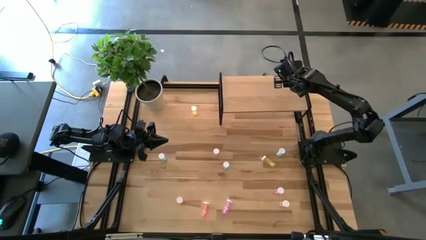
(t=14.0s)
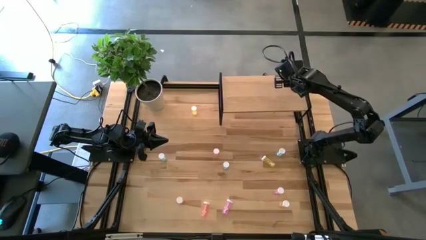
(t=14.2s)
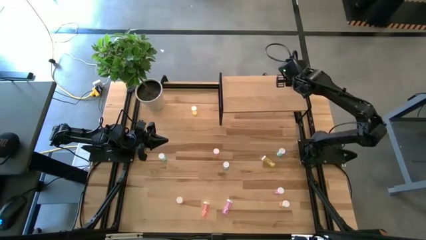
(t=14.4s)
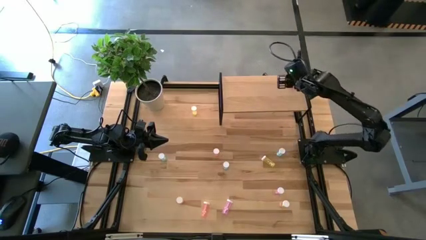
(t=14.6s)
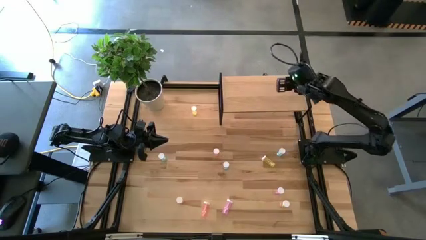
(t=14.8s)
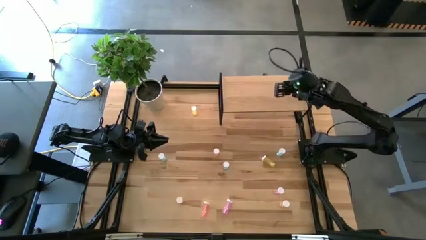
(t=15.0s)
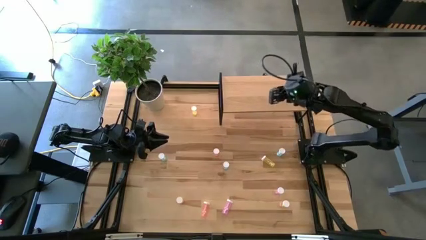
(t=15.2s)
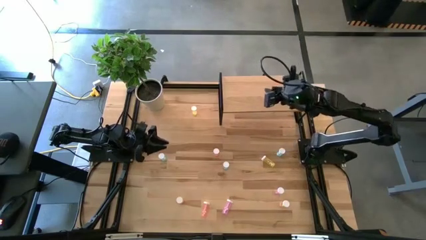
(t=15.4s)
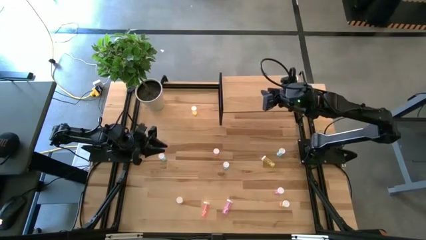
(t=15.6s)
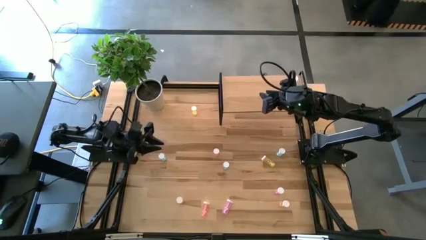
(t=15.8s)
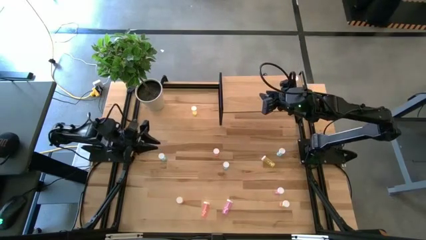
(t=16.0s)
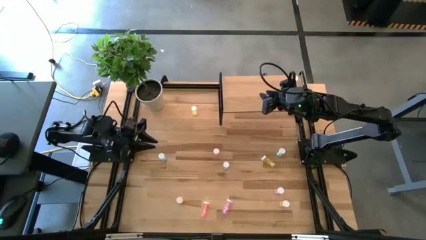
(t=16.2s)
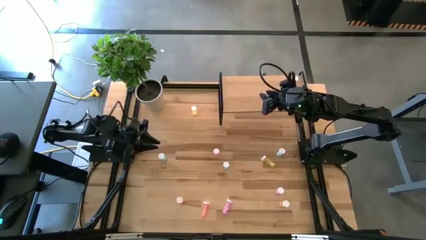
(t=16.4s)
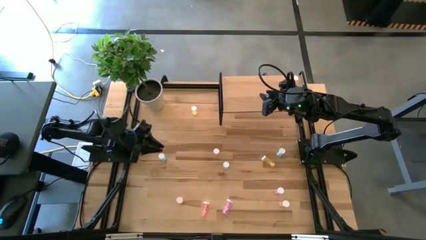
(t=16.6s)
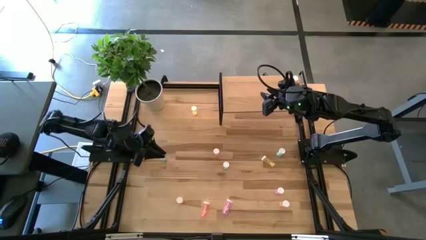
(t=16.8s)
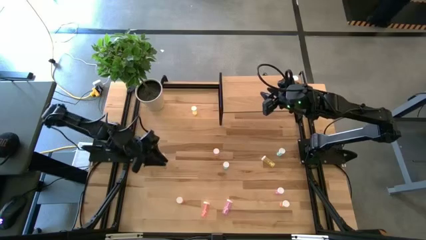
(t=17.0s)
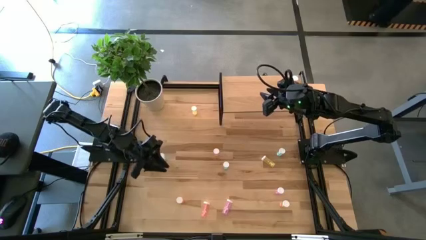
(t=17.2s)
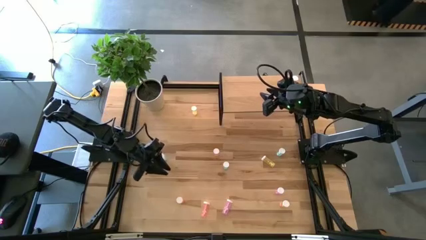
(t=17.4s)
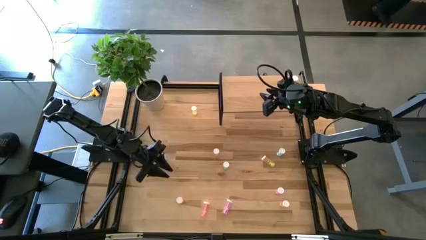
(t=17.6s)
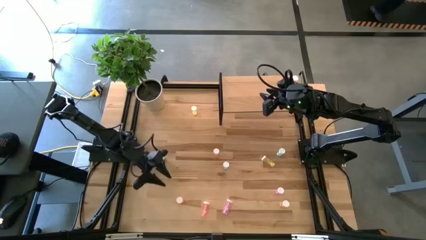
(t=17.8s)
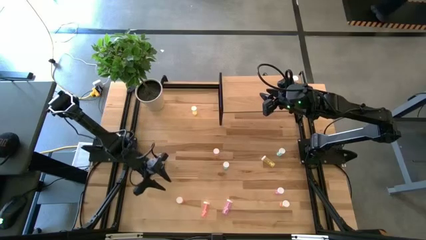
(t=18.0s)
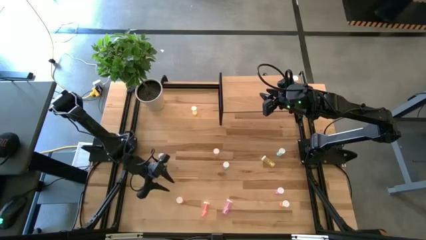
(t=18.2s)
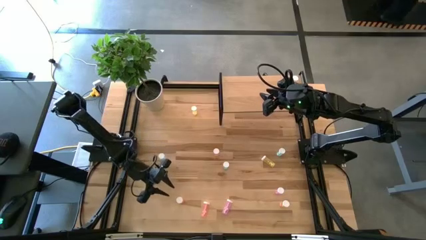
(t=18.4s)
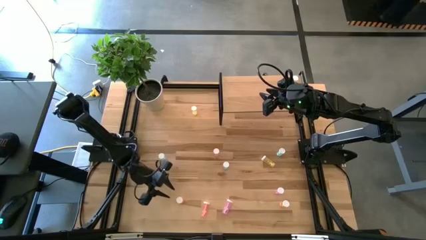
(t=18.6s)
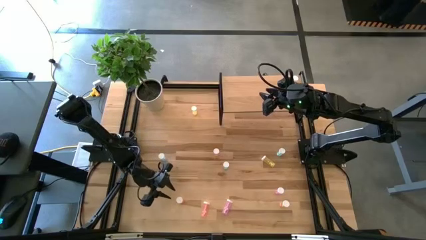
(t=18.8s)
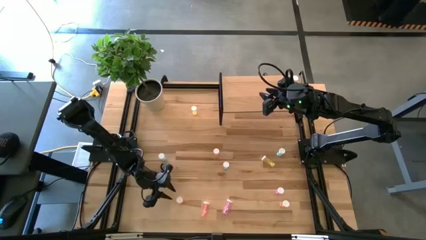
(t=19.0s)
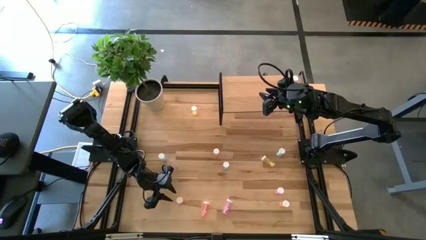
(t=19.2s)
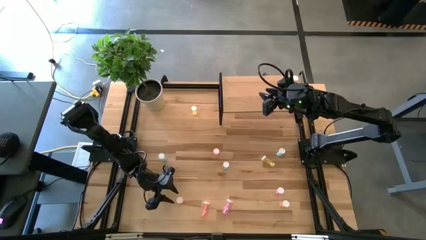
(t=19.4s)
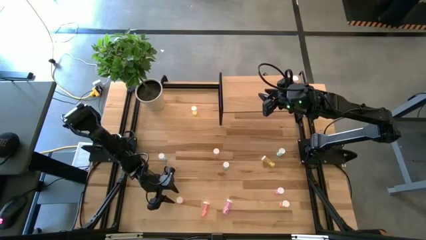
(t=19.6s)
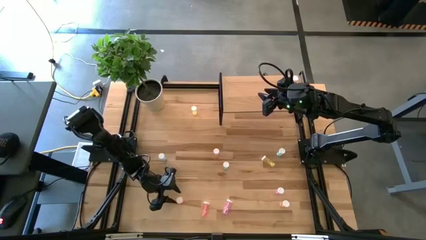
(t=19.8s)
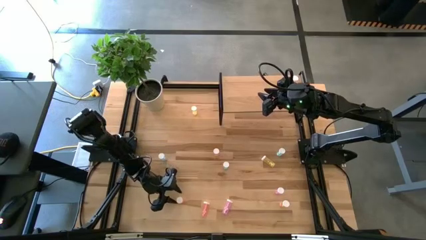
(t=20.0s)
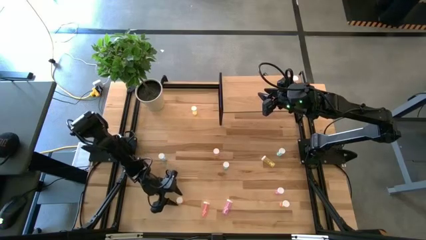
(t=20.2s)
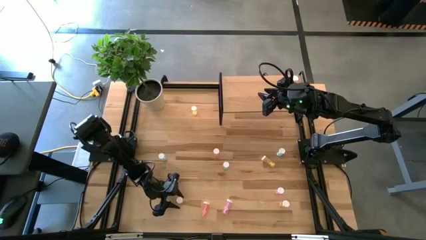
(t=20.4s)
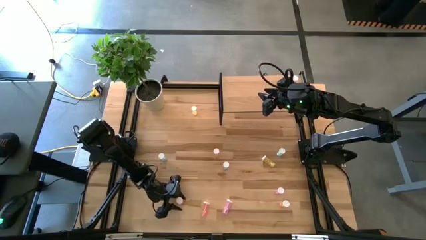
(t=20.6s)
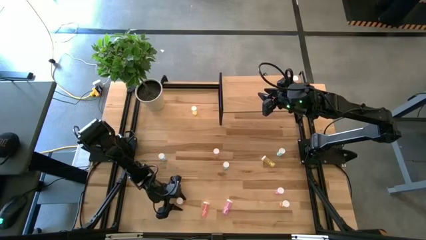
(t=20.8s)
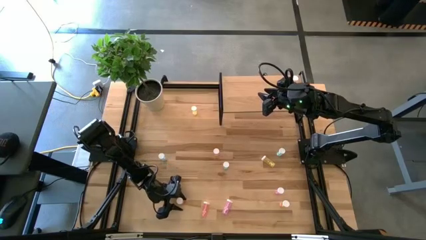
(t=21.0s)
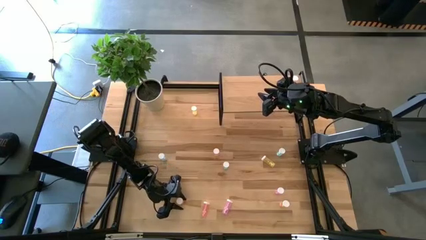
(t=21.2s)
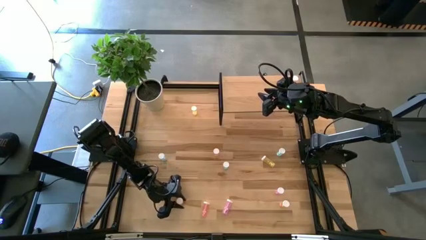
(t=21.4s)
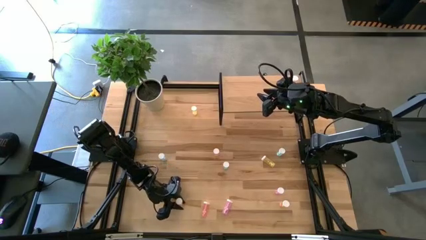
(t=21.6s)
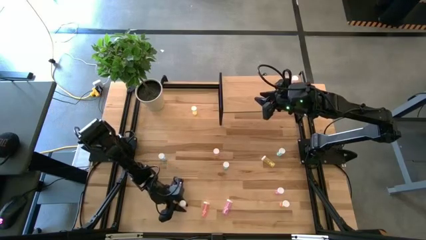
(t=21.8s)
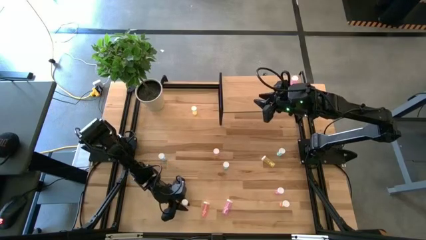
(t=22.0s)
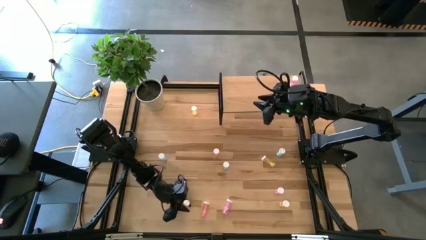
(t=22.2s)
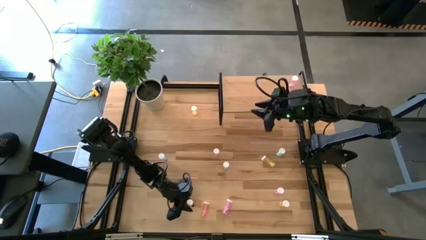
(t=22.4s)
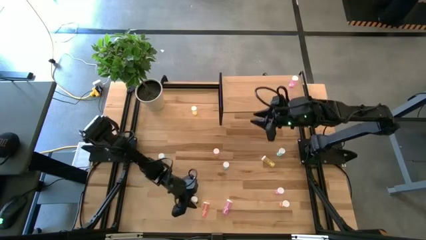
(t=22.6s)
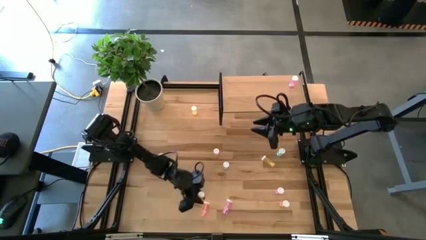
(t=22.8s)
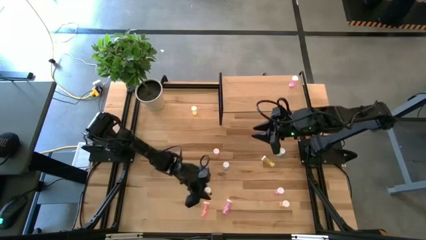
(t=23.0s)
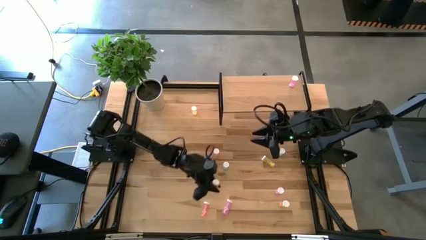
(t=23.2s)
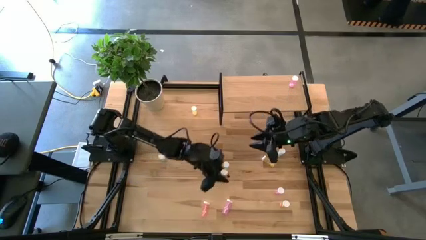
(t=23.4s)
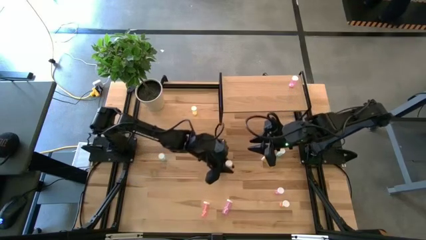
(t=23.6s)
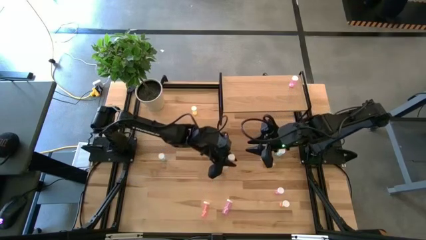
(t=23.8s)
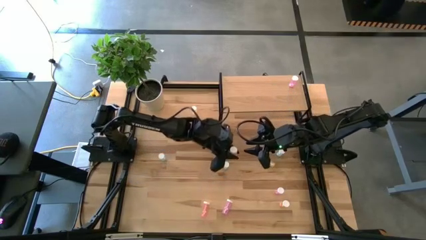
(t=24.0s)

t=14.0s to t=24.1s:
Task: Pick and place medicine bottles onto shelf by color
Put the bottom left pink pill bottle on the shelf

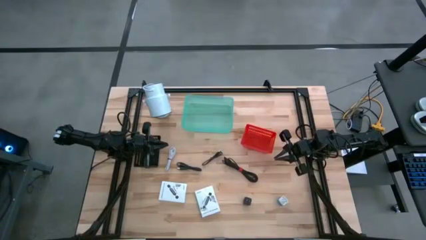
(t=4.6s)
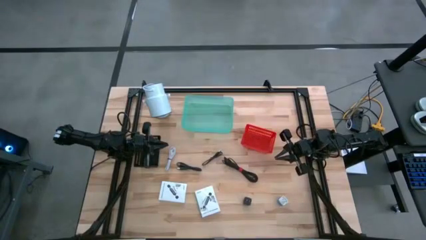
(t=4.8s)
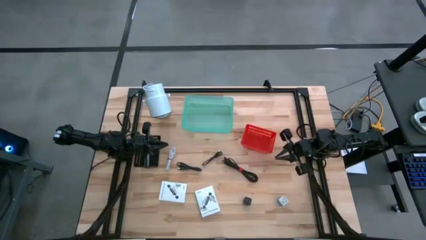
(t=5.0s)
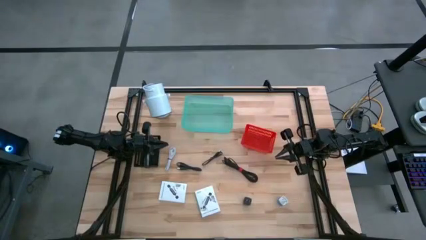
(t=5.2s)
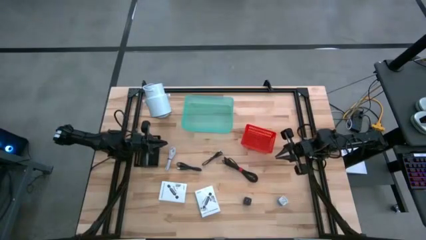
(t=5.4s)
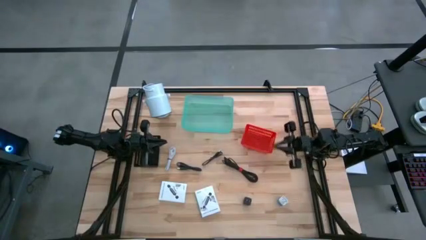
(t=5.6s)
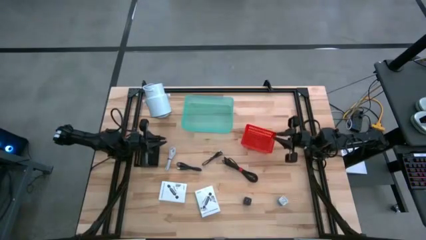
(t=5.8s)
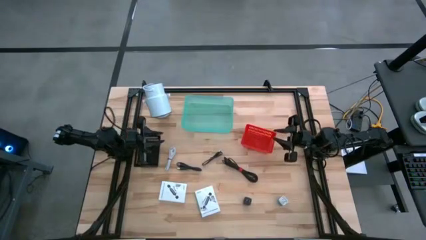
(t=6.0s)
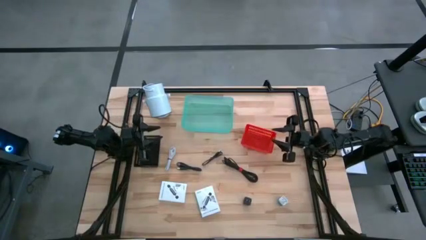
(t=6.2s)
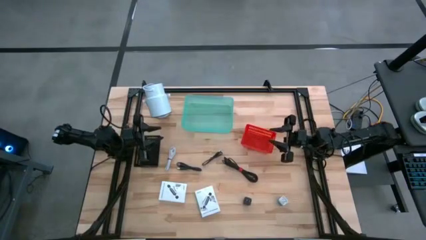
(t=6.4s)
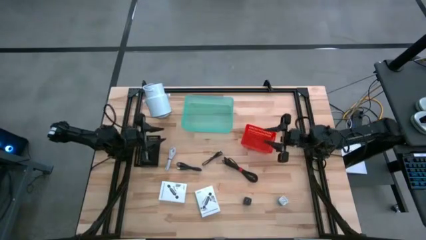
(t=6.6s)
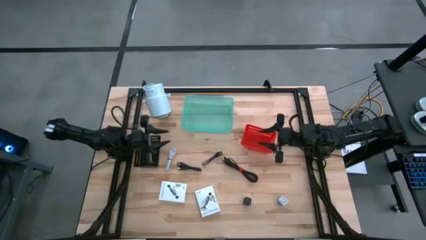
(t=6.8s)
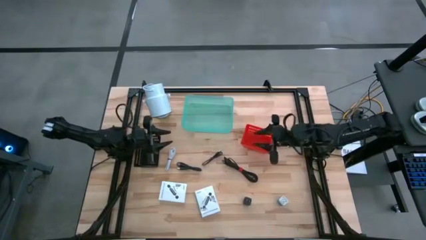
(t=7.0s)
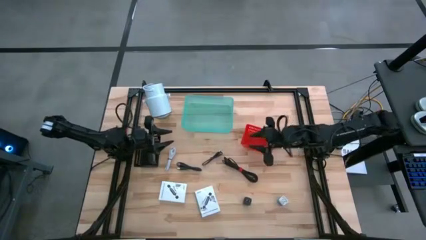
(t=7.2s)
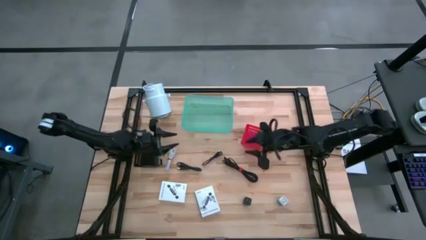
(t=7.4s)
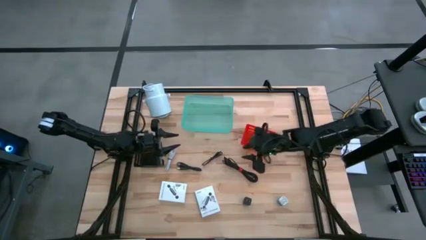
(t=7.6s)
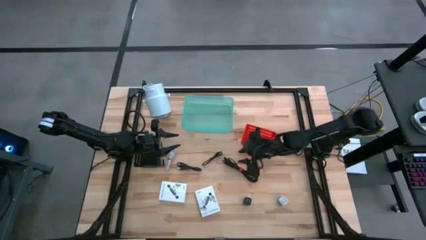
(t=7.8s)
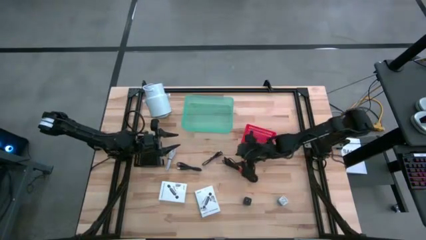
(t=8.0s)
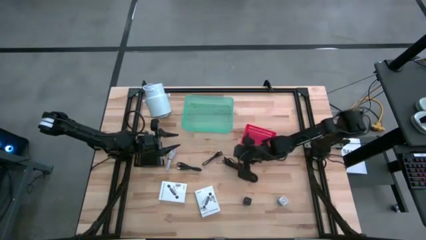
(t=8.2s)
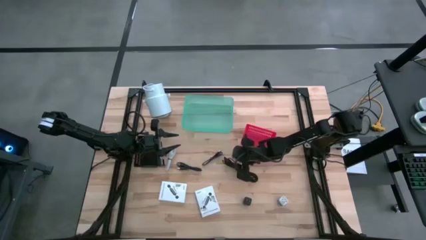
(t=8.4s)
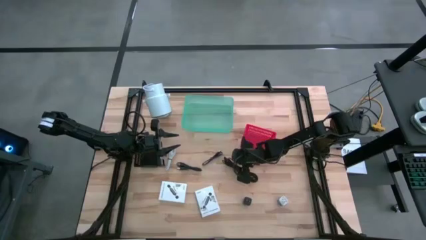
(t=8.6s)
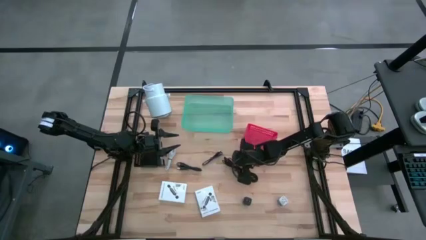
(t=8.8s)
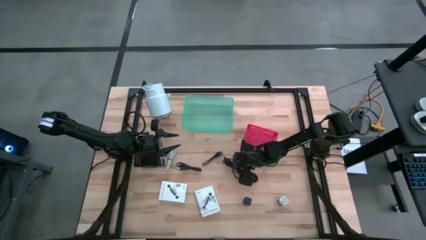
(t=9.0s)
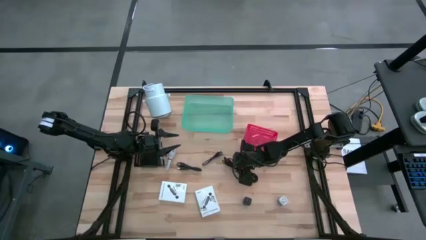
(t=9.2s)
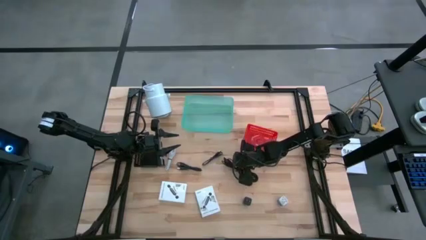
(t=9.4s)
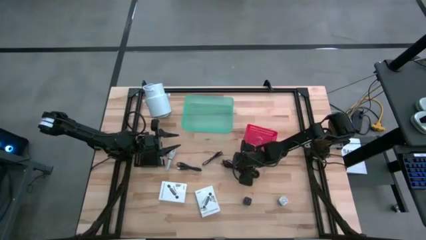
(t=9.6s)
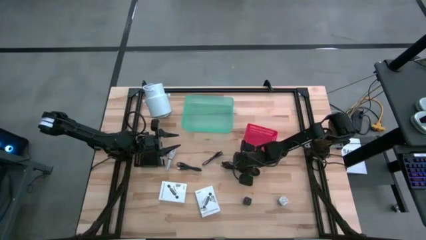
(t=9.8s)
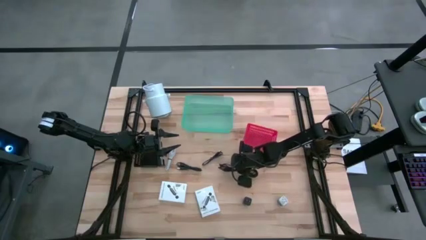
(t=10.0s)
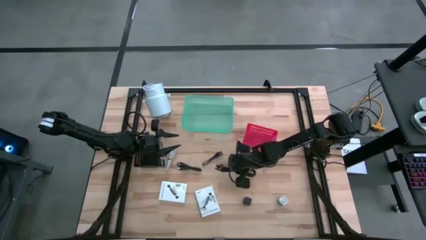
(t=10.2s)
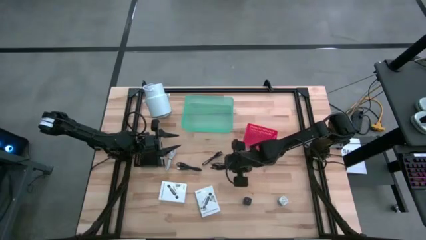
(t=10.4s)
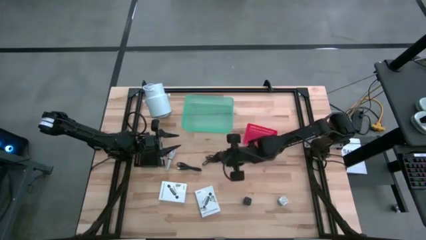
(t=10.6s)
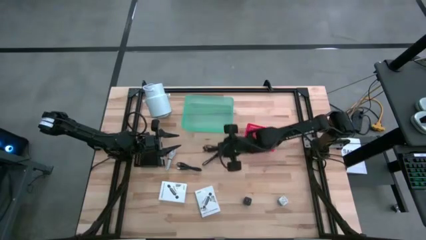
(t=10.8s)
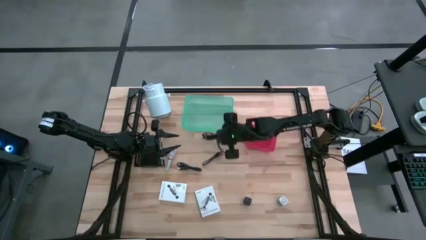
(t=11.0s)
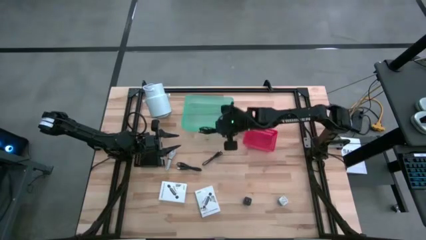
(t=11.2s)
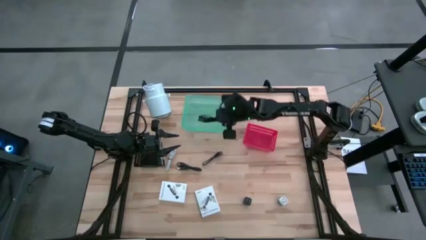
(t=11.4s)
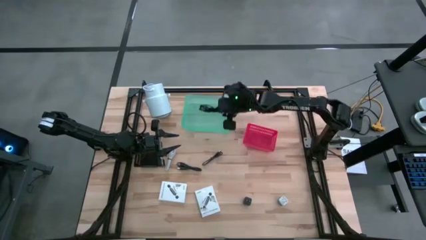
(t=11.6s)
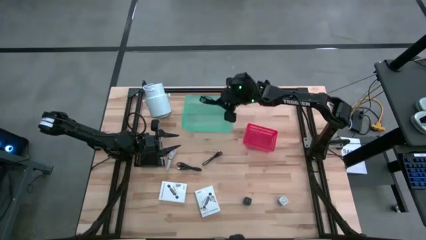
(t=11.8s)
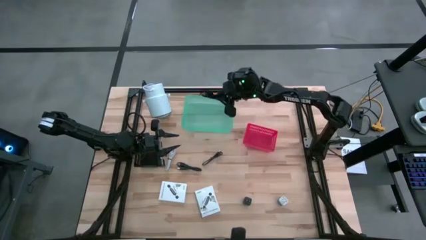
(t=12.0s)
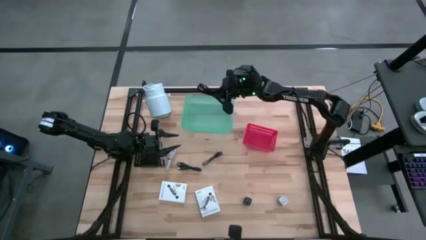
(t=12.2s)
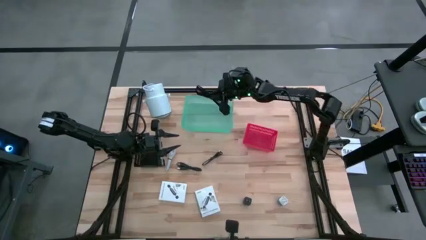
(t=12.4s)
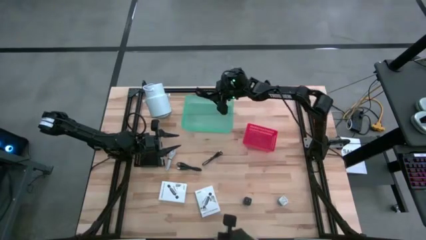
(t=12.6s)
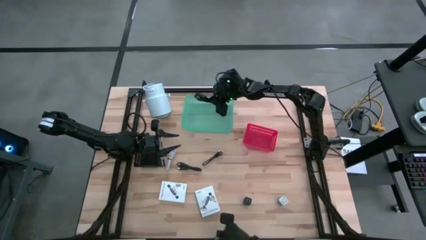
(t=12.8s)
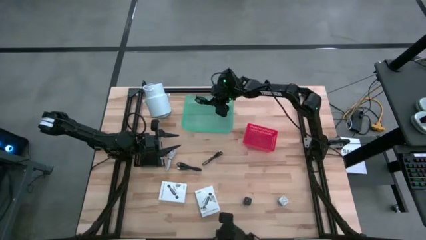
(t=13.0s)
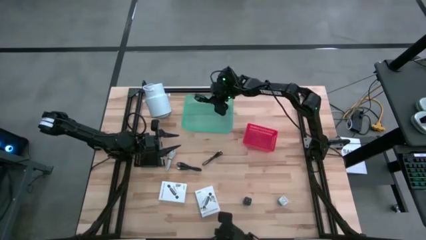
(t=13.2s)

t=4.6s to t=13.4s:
Task: Pick and place items into bin
Put the right black charger cable into the blue bin
